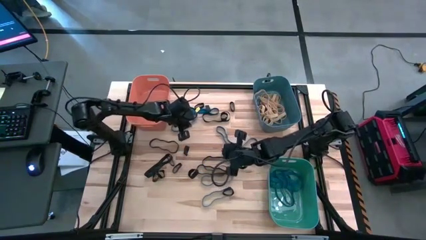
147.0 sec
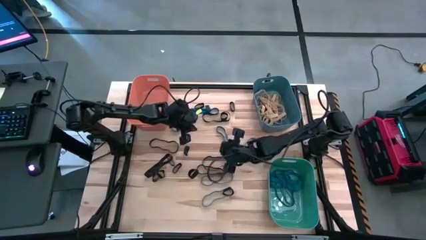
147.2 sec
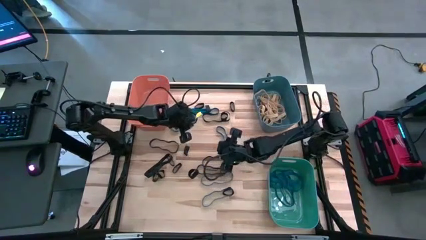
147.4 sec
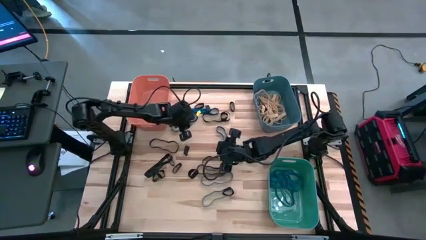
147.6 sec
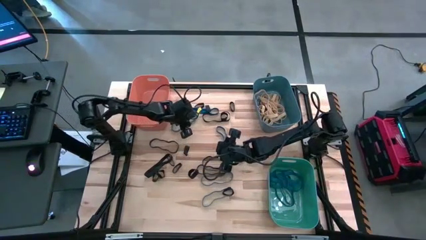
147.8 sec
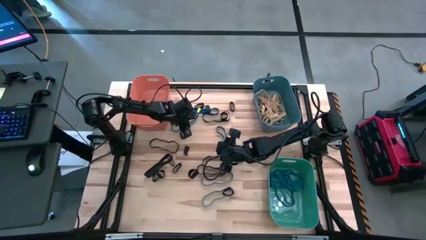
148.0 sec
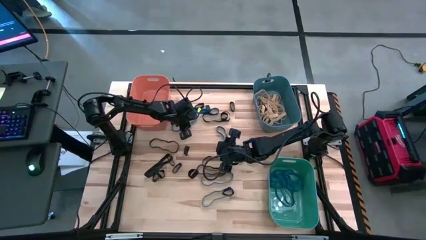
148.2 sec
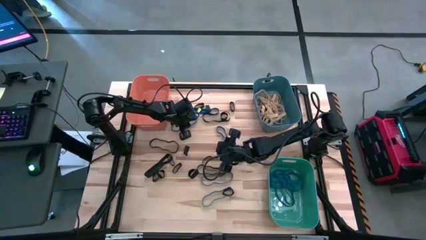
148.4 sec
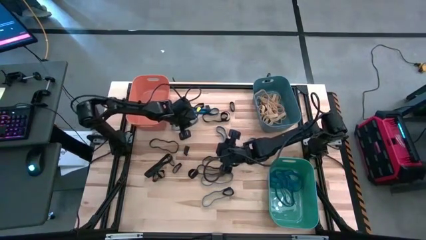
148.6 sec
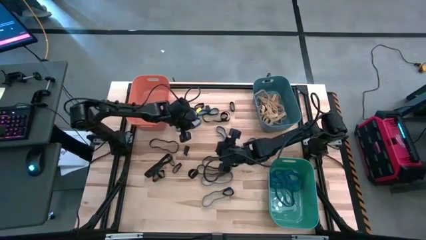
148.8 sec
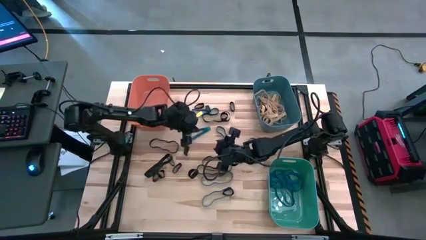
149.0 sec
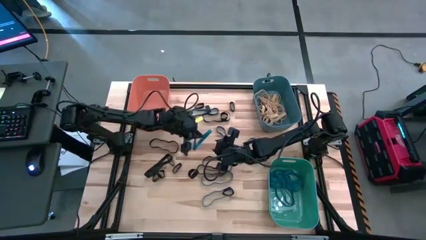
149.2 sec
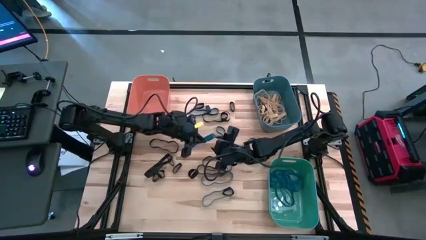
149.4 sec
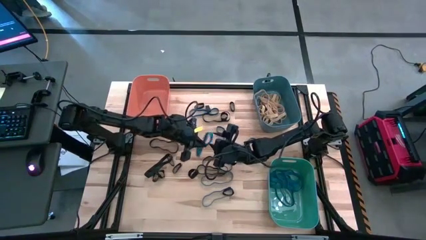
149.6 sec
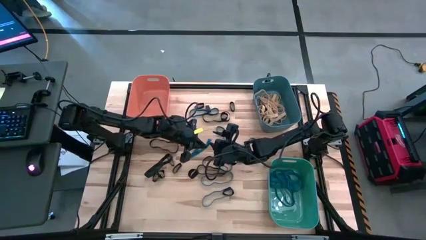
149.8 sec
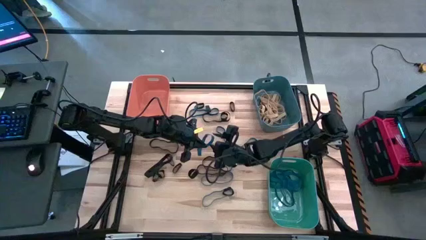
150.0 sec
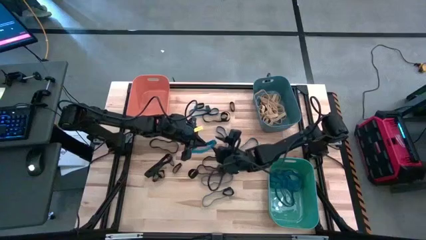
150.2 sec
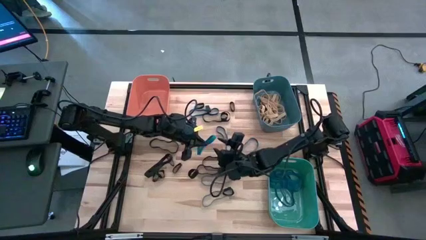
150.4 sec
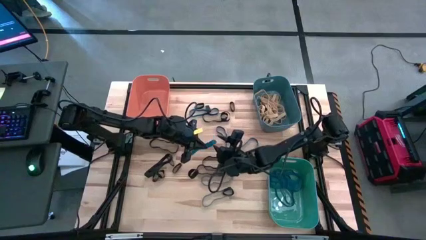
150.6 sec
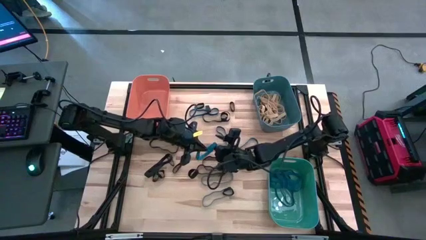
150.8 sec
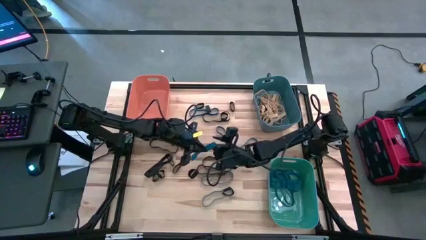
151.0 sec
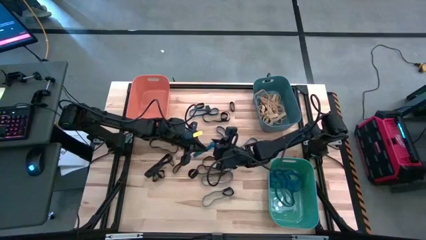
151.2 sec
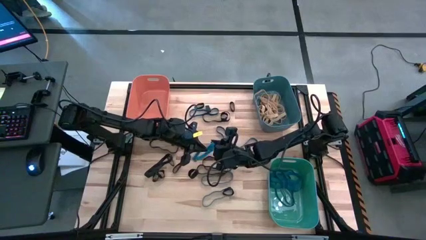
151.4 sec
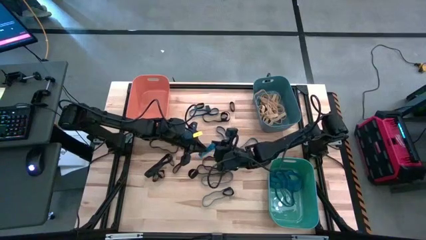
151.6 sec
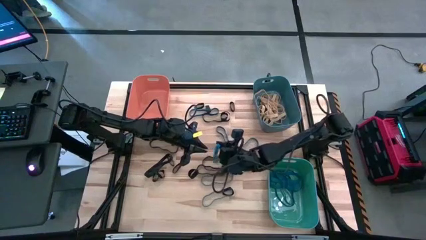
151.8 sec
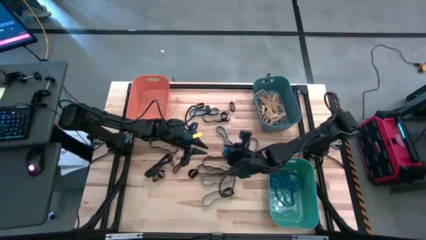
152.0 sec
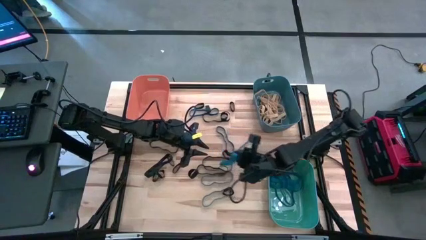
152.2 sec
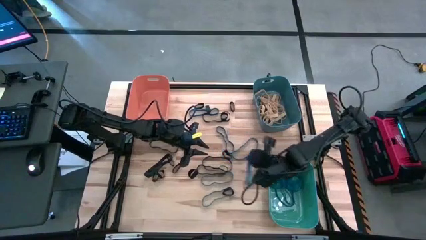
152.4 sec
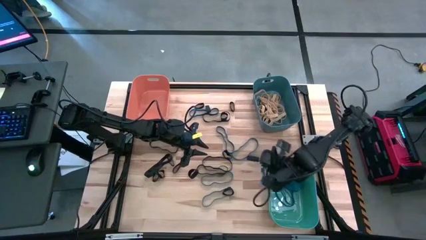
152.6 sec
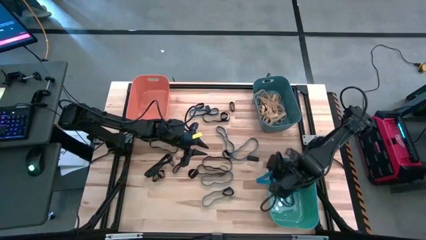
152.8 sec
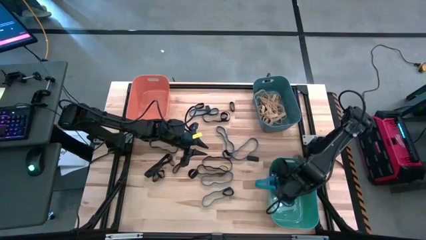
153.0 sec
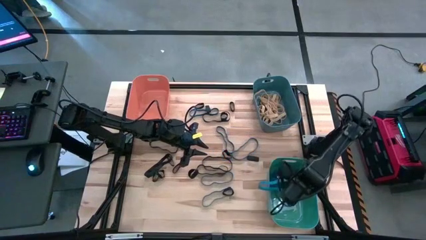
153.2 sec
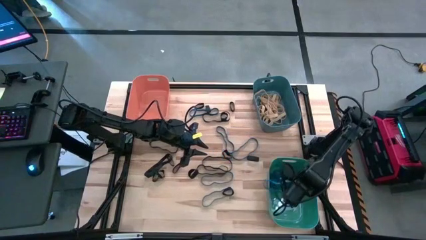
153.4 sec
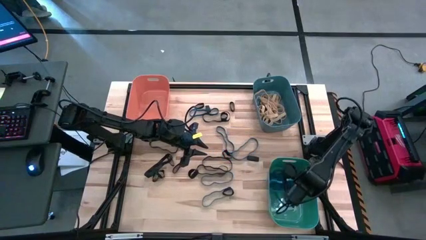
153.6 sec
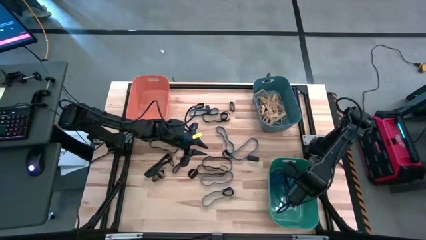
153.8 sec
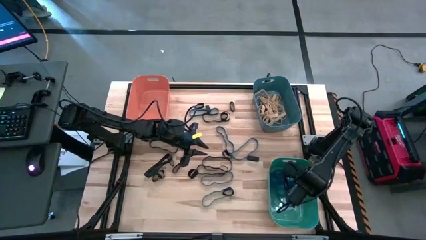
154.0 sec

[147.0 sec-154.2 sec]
Task: Sort rubber bands into baskets
Put the blue rubber band into the green bin

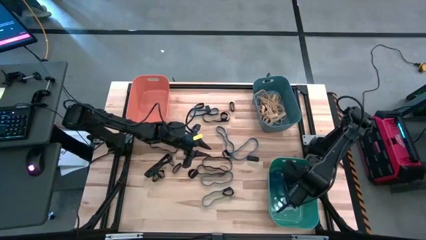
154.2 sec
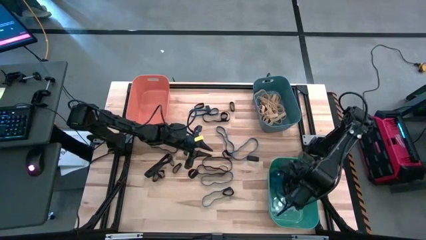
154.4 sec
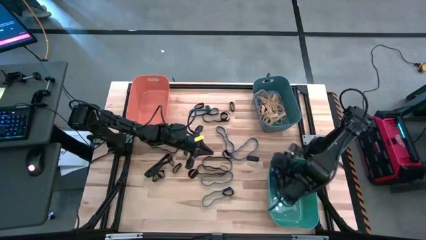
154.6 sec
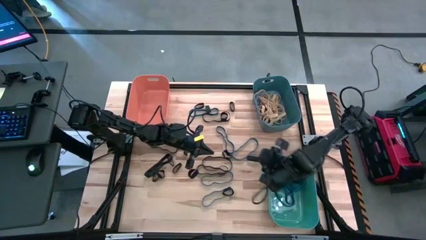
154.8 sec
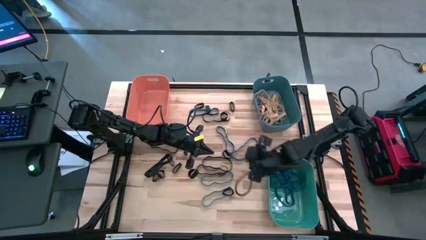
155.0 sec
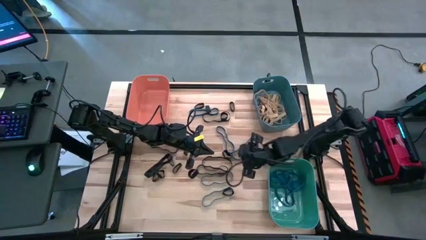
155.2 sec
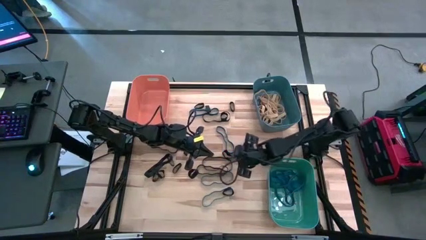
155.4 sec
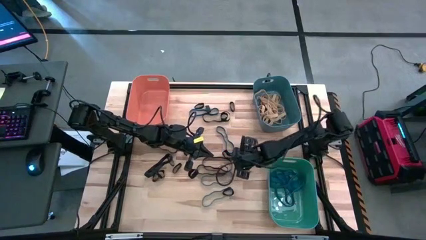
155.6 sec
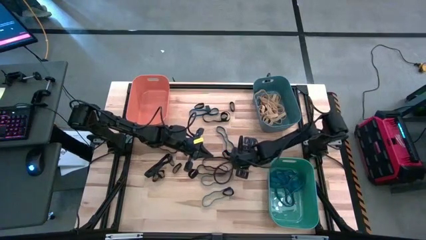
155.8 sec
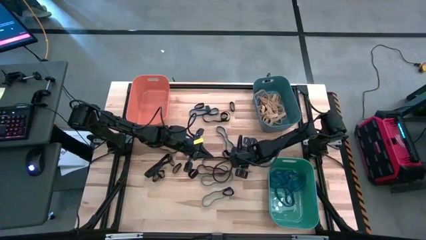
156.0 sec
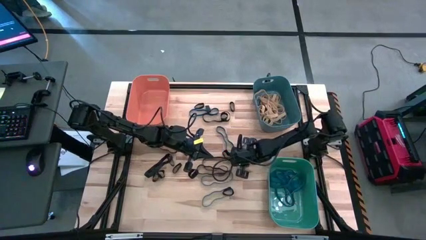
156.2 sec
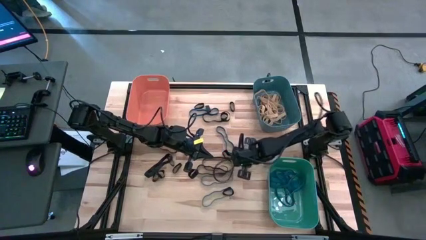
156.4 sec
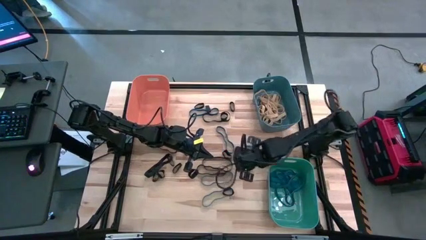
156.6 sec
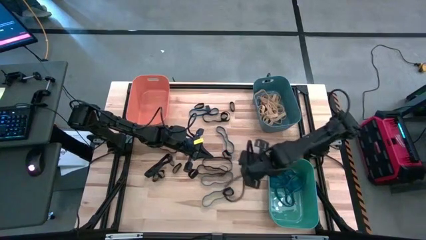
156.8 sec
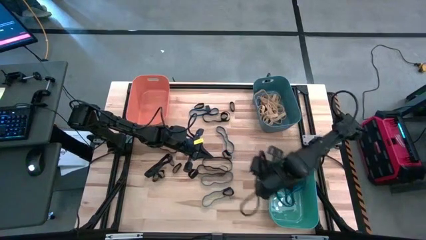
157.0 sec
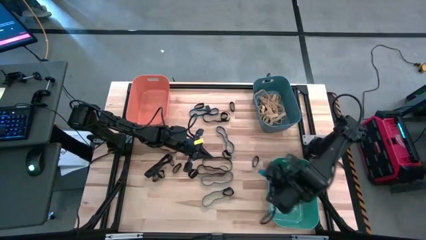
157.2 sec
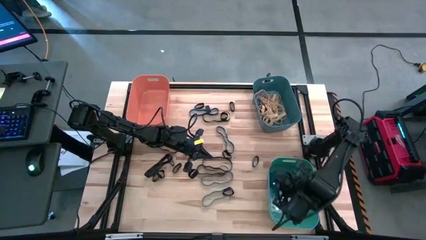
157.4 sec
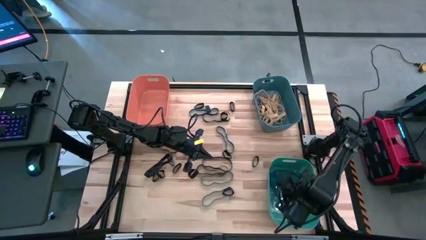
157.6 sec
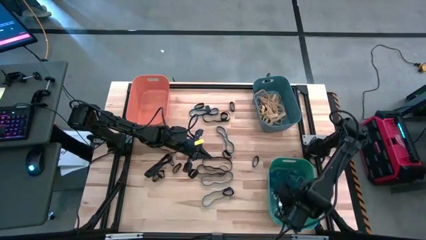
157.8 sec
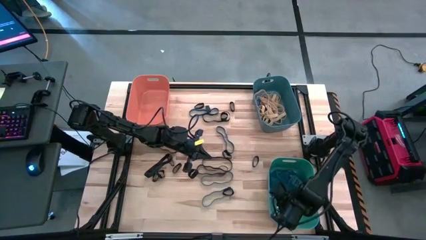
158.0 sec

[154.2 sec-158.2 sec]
Put the blue rubber band into the green bin

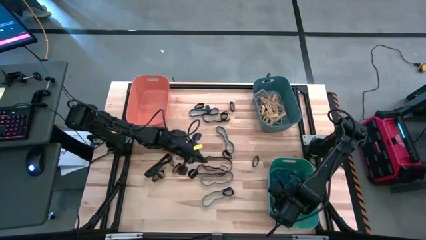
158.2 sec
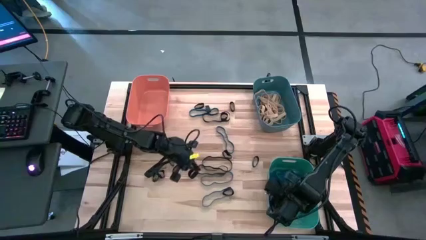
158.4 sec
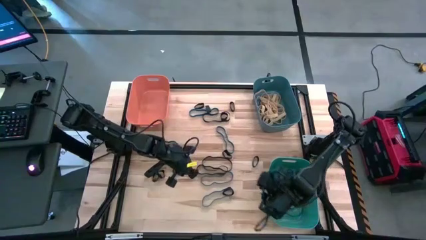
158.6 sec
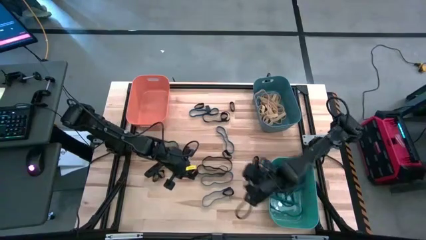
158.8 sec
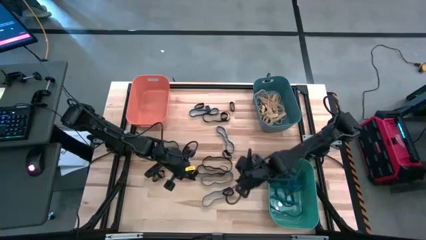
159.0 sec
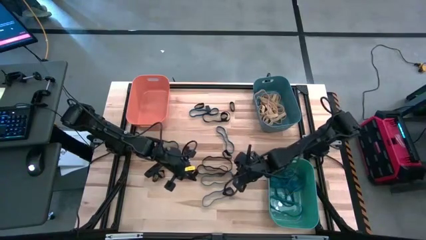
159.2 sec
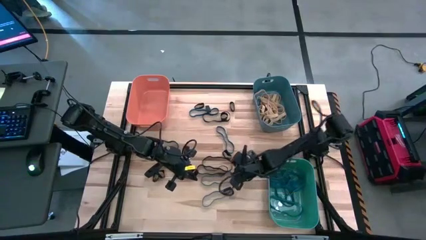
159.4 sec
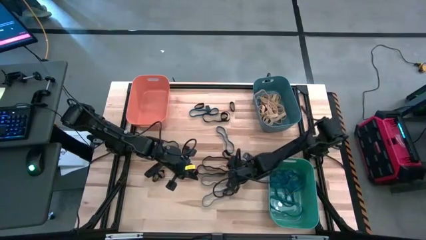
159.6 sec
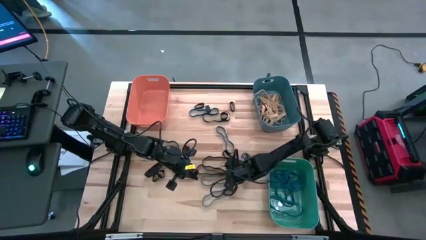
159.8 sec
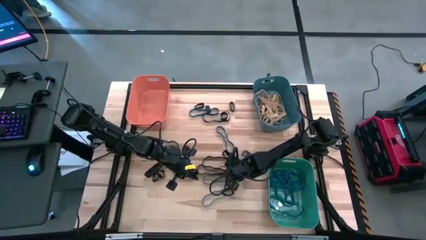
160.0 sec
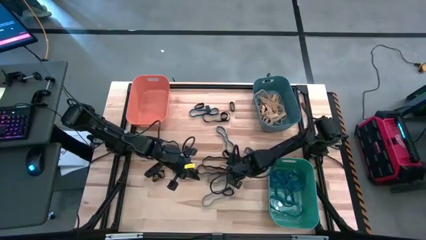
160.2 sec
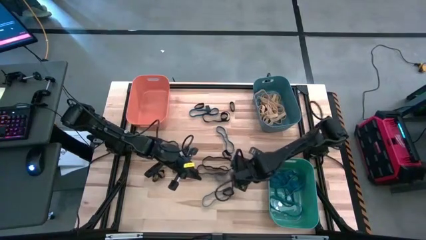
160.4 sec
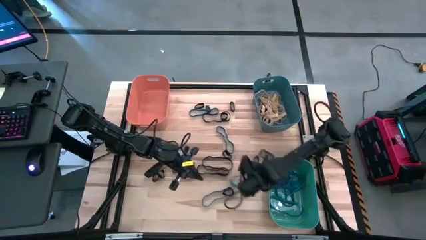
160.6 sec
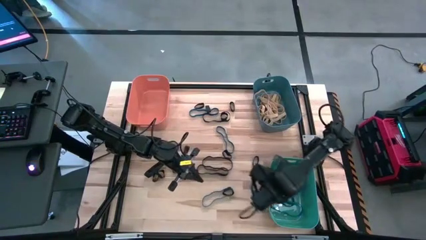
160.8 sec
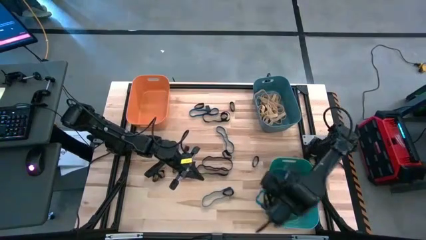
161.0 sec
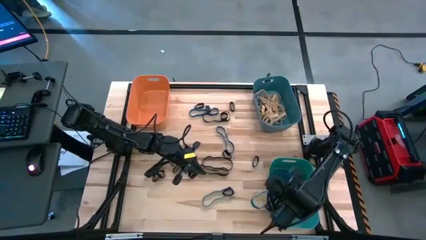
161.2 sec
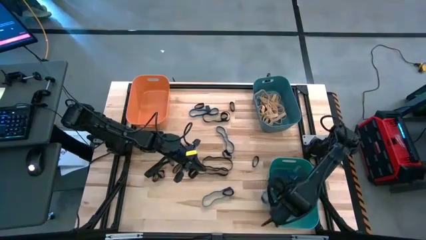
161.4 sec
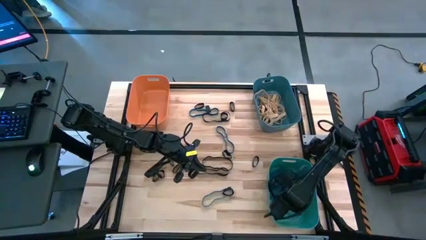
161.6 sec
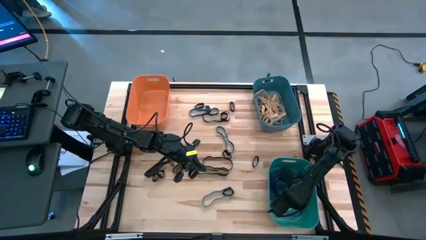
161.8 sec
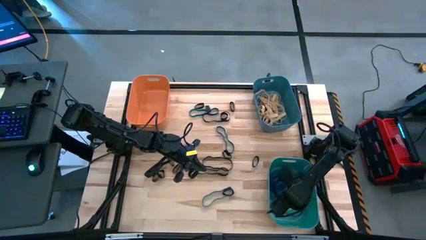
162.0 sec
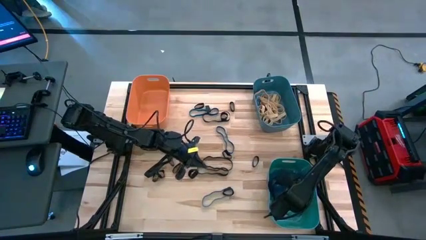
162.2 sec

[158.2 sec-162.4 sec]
Put the blue rubber band into the green bin

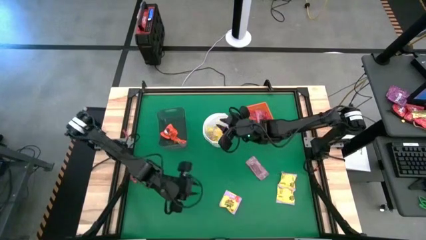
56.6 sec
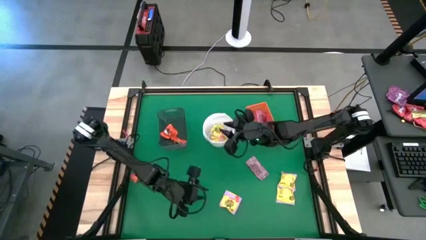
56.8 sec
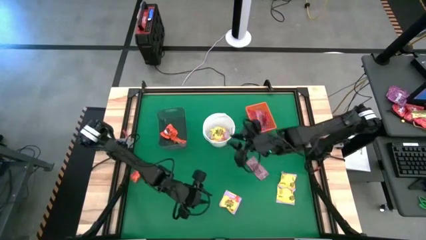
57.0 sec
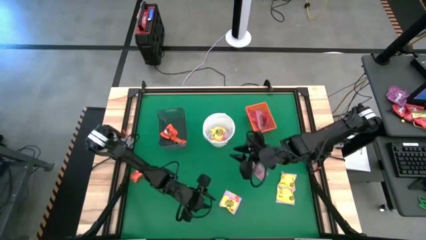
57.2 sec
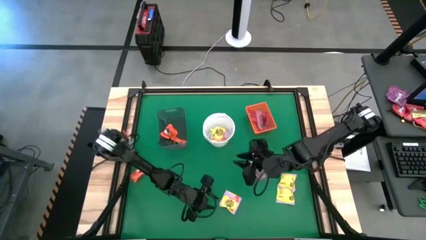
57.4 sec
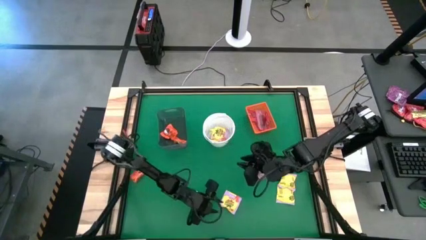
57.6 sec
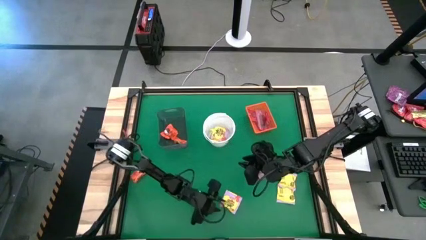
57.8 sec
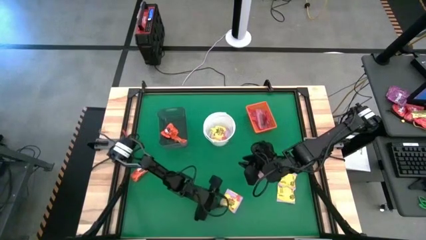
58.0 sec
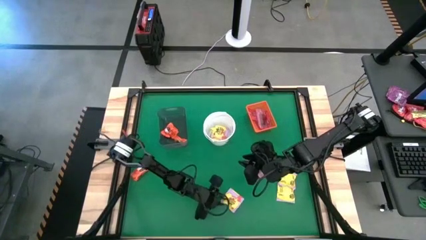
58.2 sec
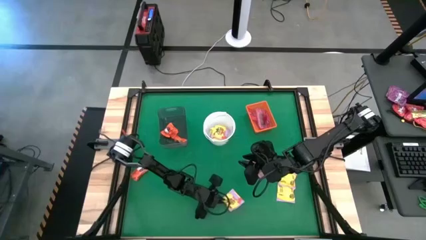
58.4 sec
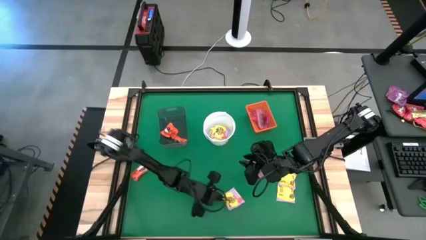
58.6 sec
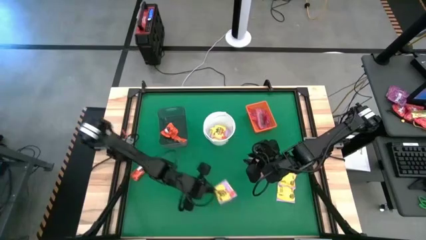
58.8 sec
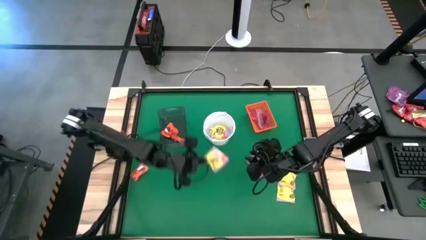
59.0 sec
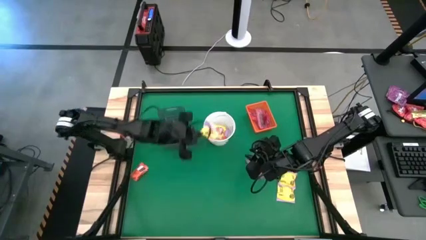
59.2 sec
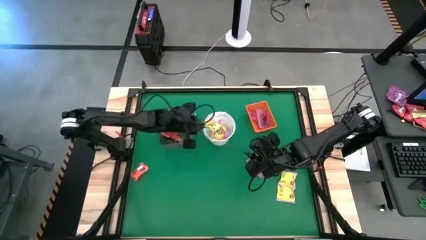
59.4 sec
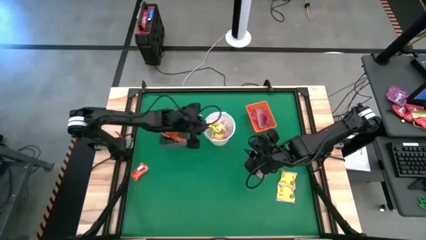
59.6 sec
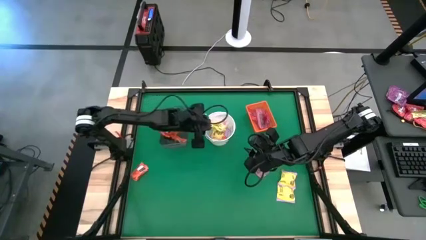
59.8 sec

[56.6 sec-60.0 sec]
Task: Sort candy by brand, put in halloween buckets
Put the yellow candy into the white bucket
